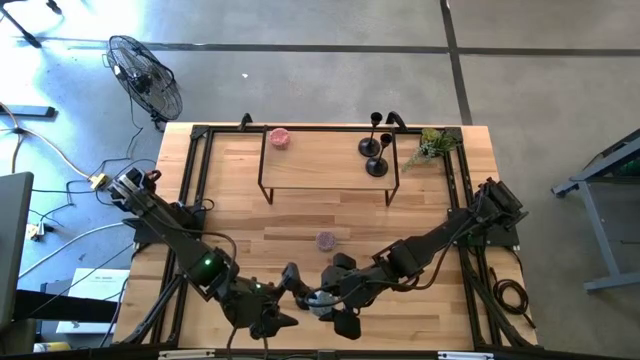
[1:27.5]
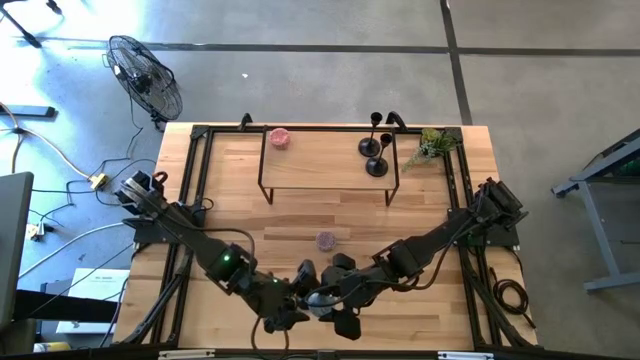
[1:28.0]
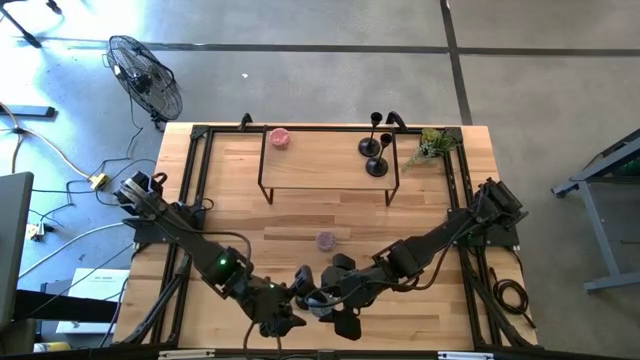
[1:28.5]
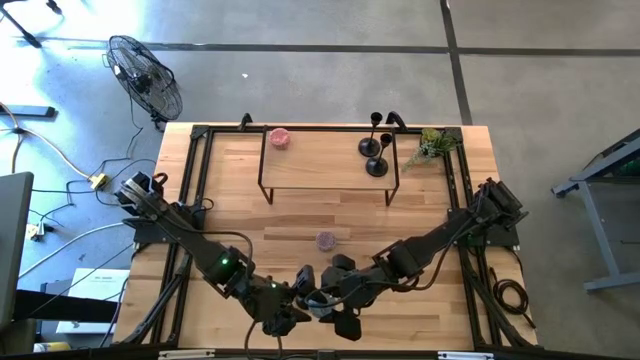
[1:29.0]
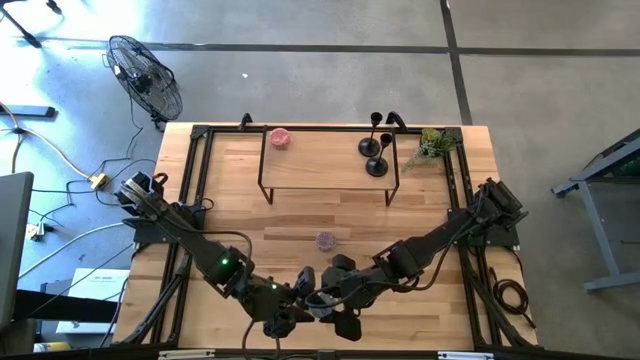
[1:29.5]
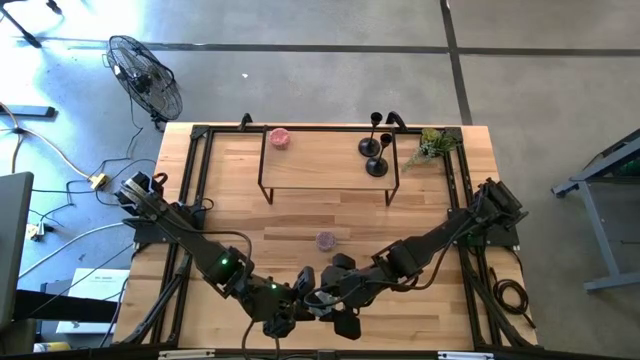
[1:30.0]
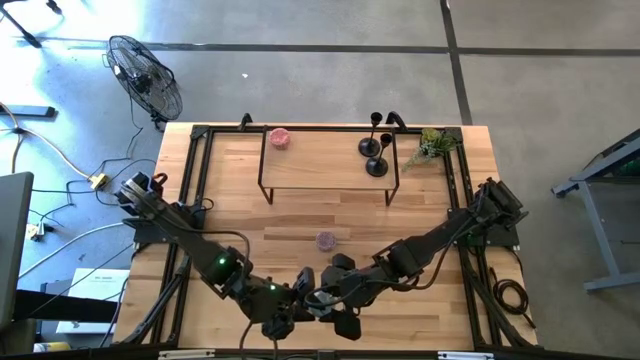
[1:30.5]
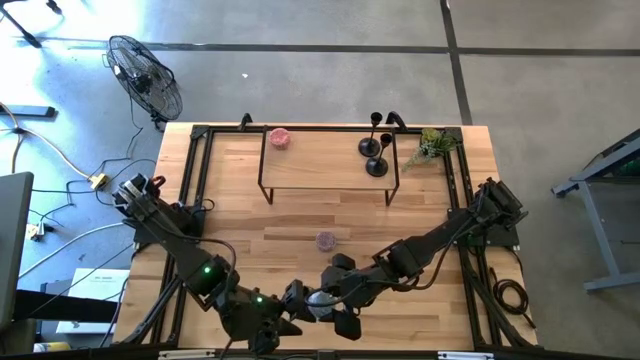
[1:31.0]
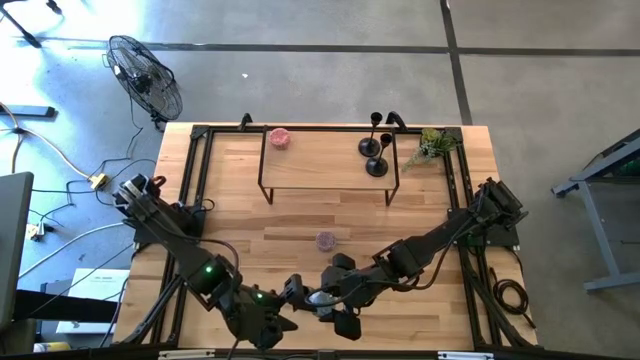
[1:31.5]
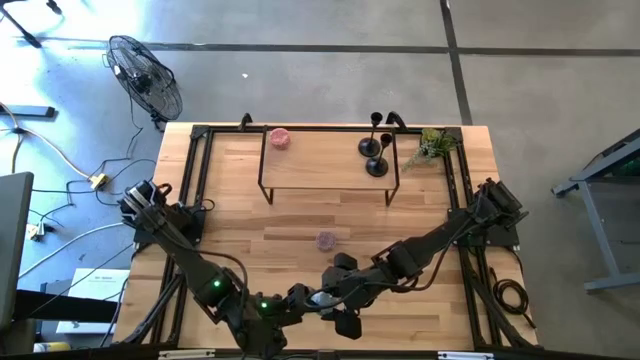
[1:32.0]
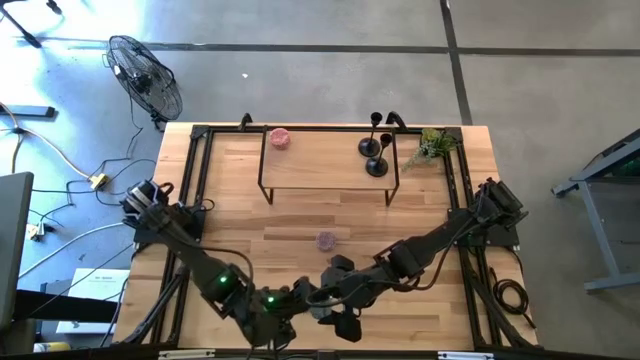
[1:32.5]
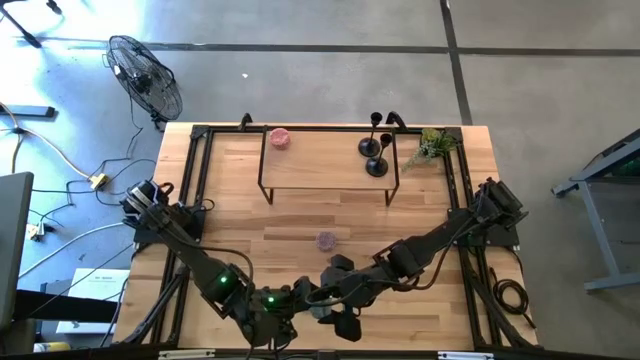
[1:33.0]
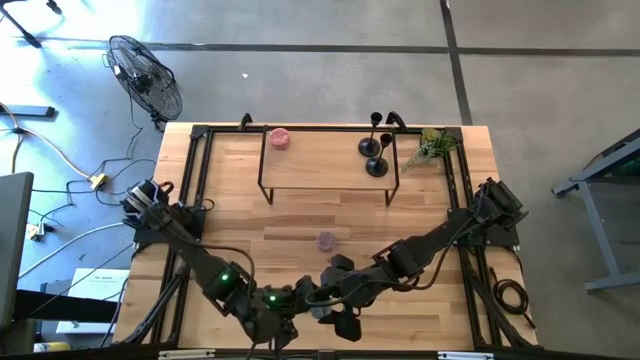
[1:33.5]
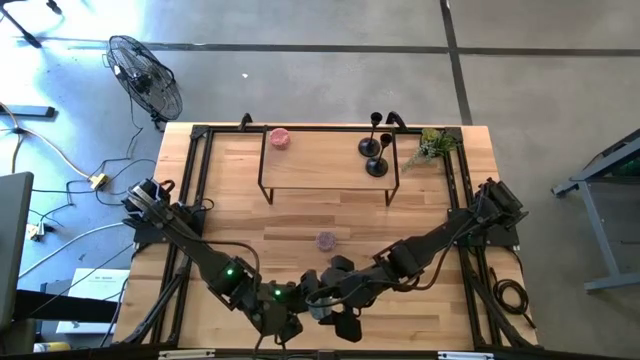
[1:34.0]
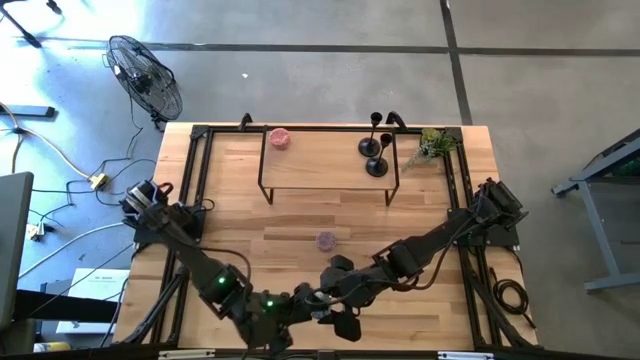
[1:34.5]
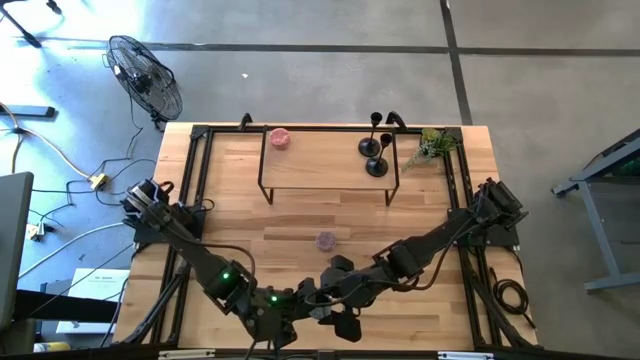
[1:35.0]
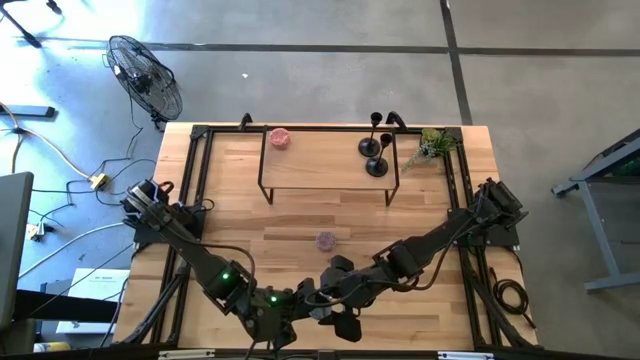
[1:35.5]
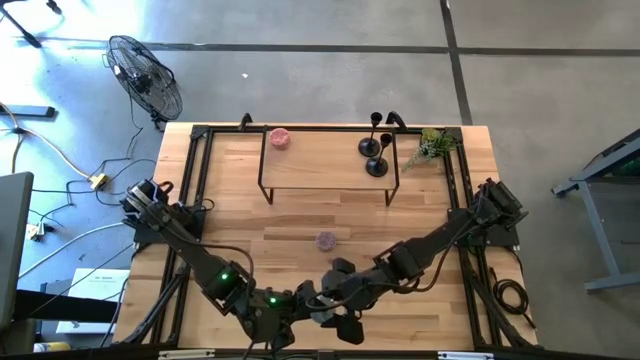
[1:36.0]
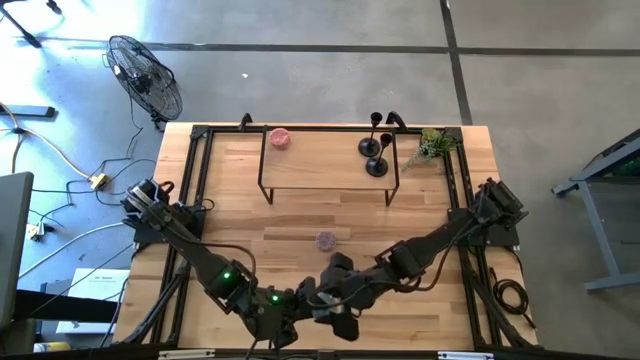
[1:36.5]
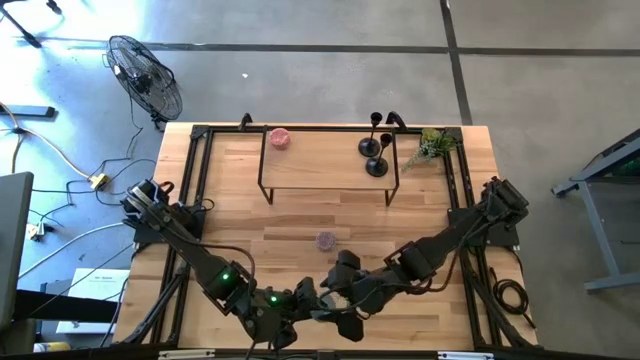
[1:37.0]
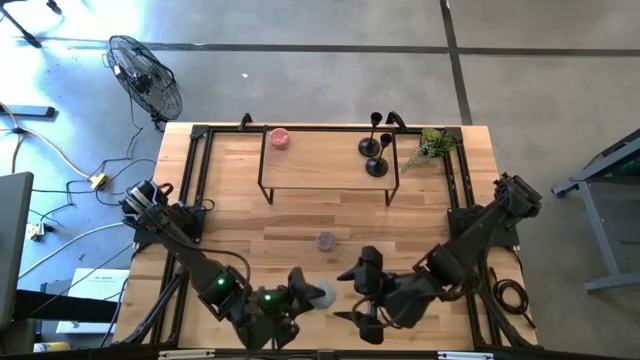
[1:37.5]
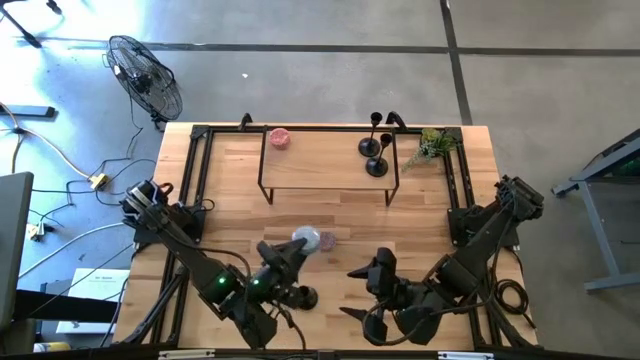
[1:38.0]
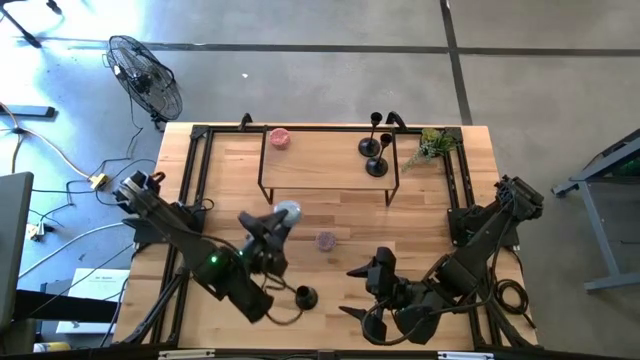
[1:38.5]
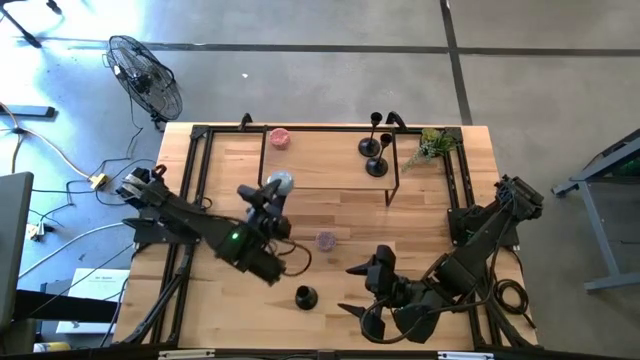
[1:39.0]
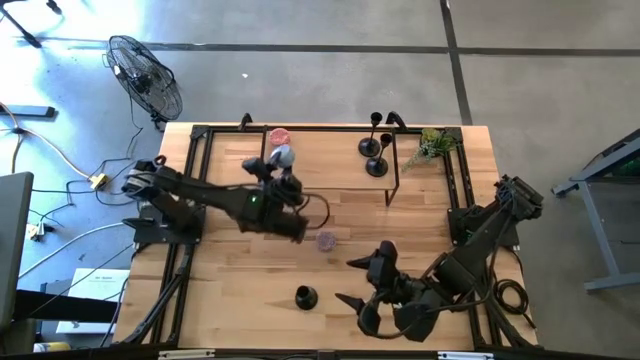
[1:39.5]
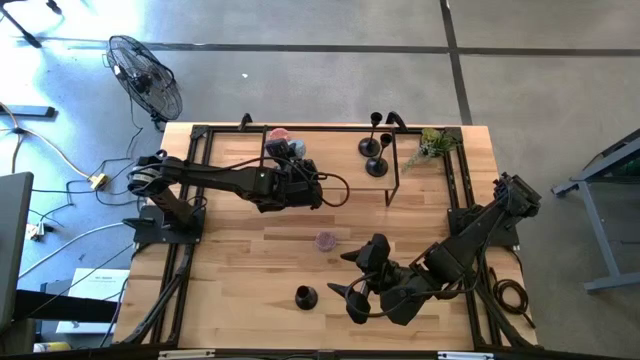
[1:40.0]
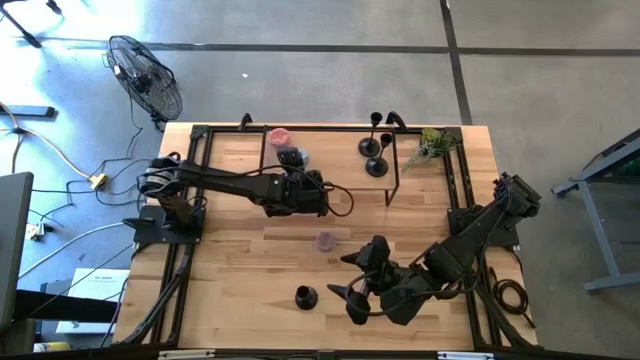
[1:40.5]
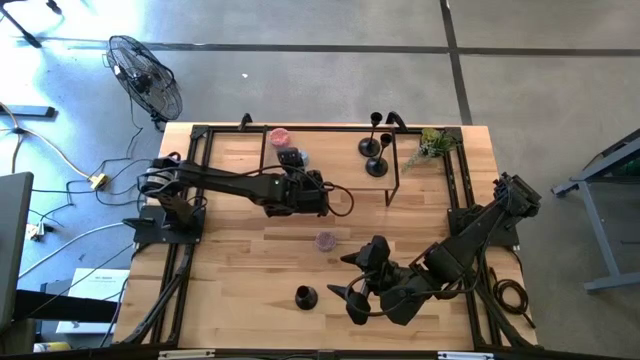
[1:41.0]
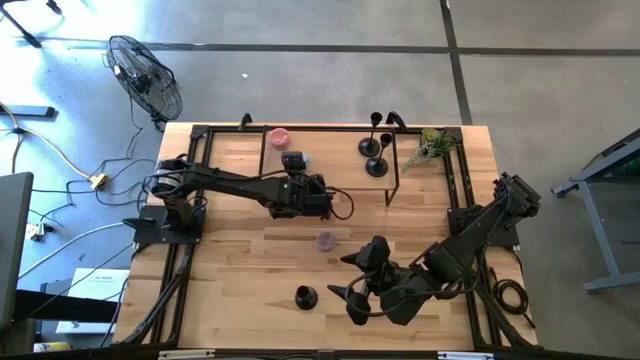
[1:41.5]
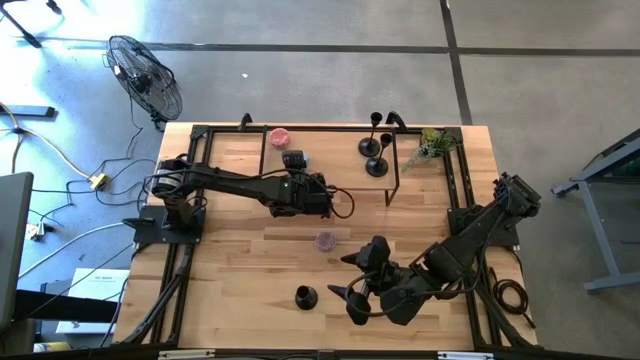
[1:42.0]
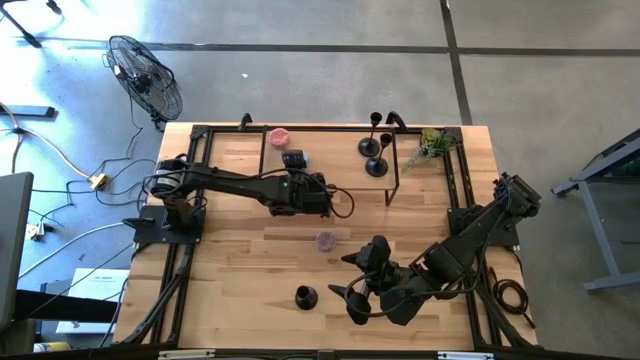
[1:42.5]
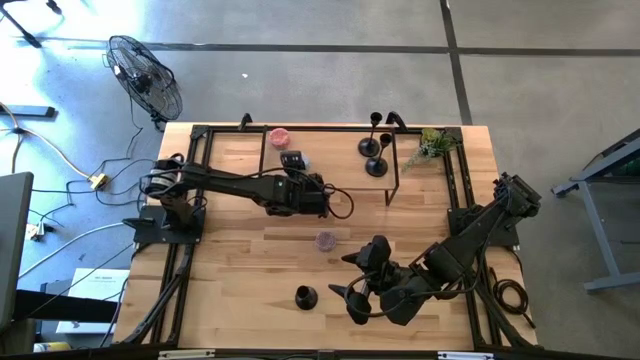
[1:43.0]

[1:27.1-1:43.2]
Task: Pick & Place candle stick holders
Put the blue patterned scented candle on the shelf
